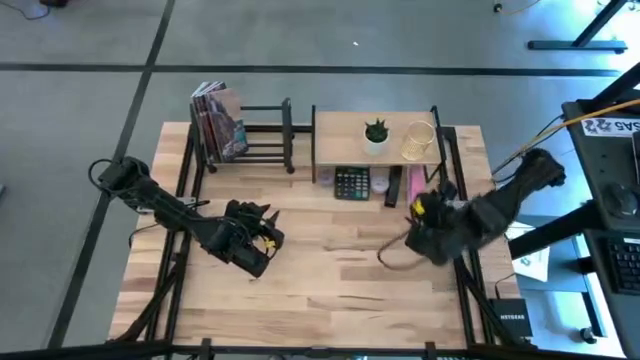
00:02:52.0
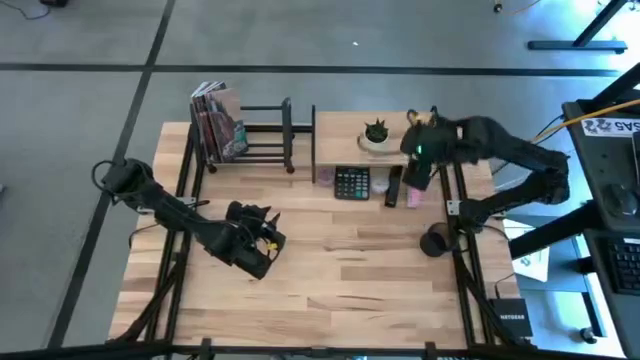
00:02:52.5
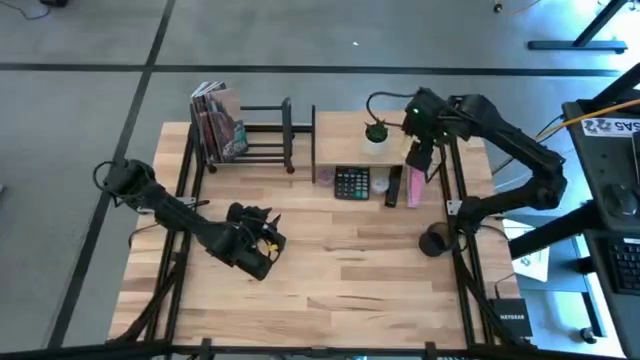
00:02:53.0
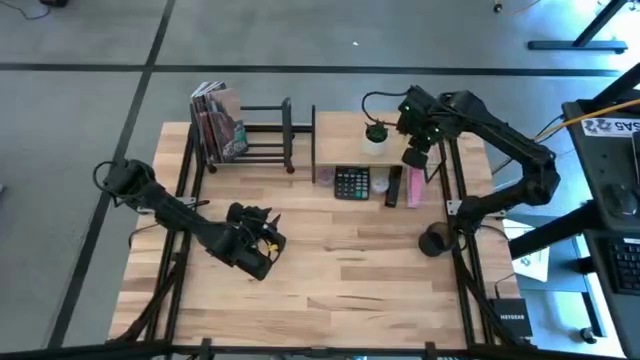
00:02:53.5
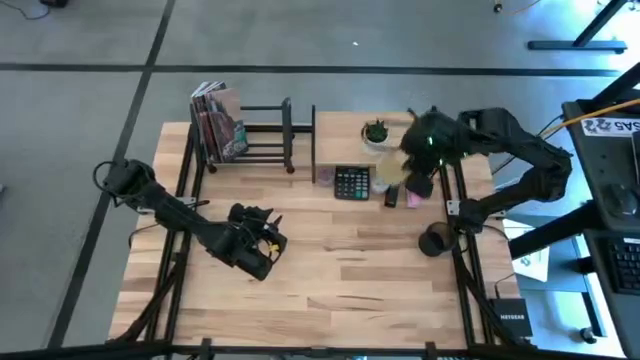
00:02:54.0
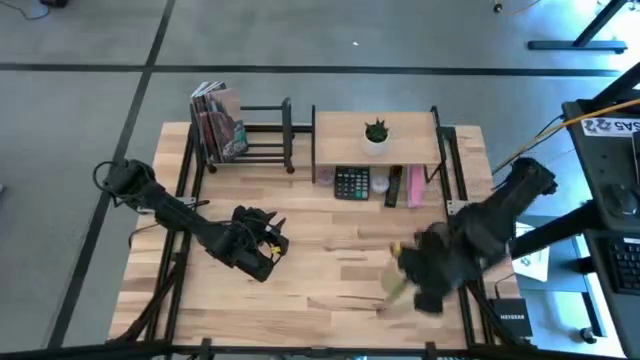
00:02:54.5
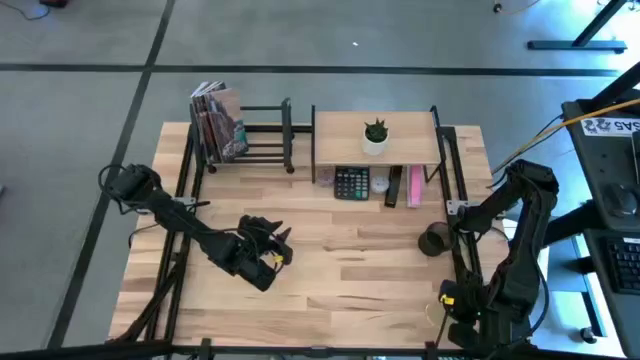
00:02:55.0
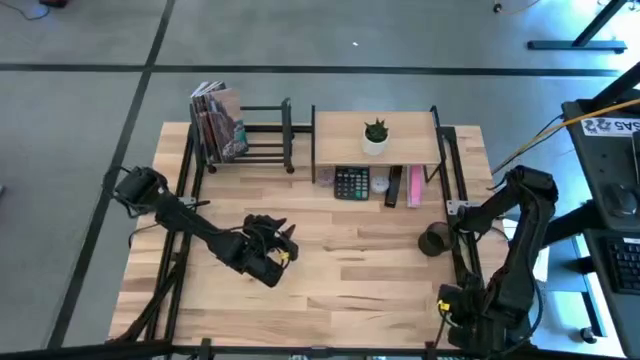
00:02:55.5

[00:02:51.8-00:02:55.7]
Task: Stock shelves
Remove the gold pen organizer from the shelf

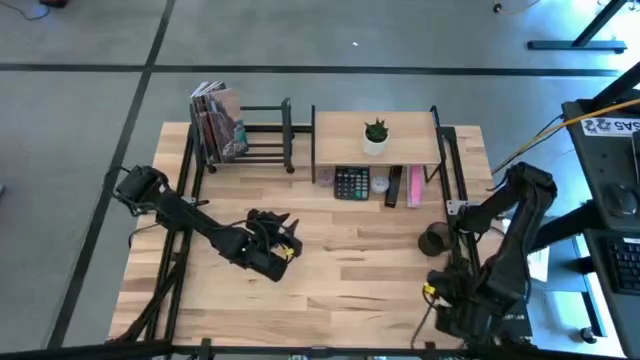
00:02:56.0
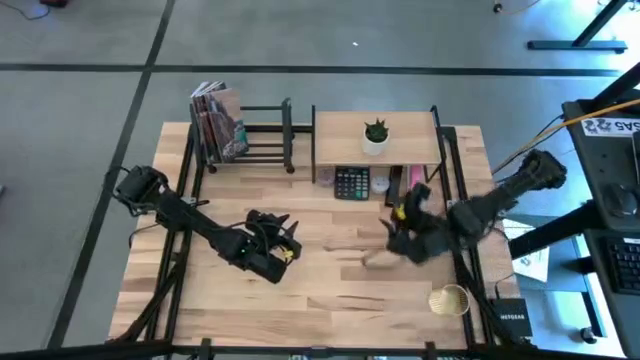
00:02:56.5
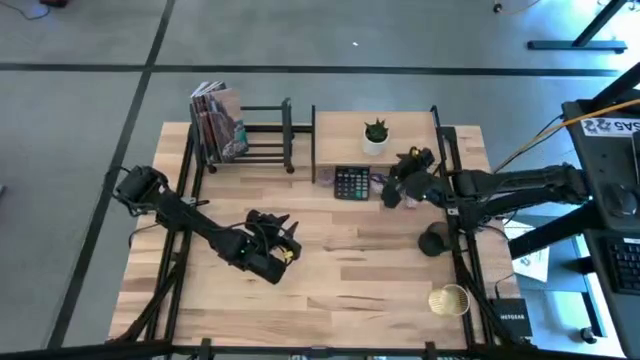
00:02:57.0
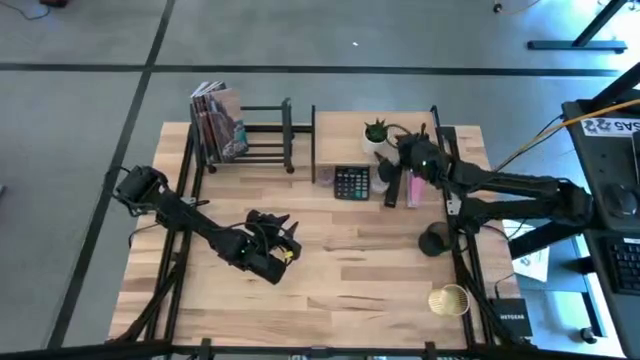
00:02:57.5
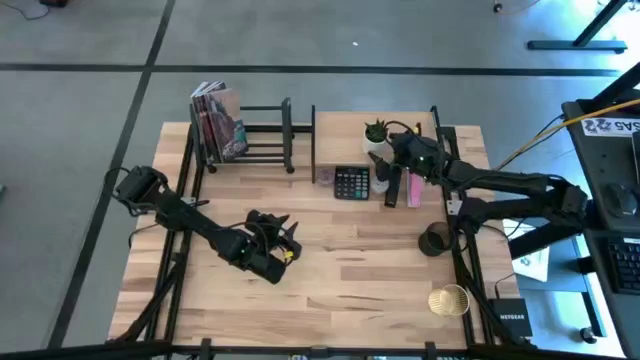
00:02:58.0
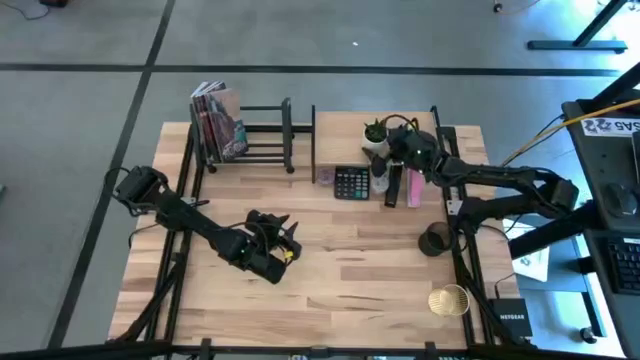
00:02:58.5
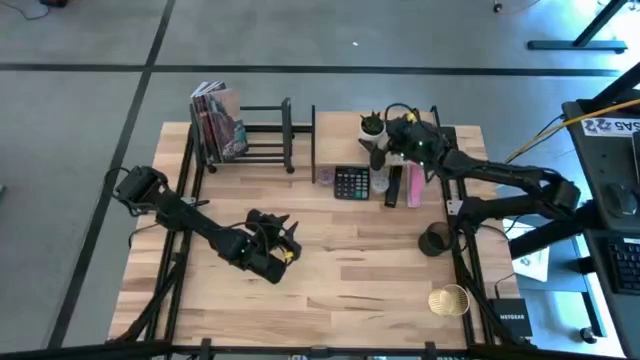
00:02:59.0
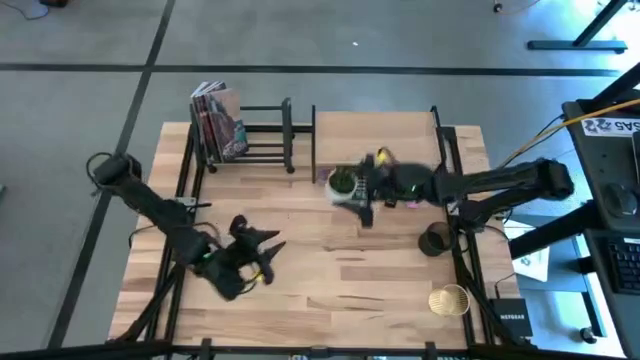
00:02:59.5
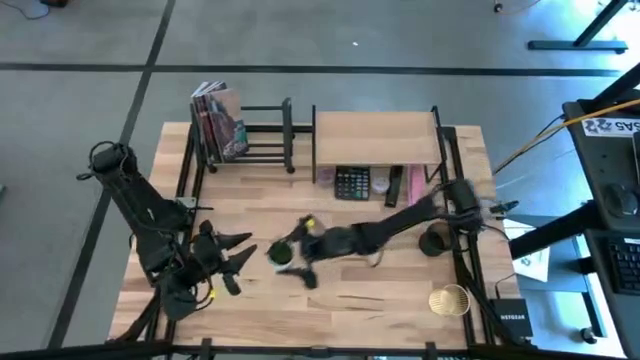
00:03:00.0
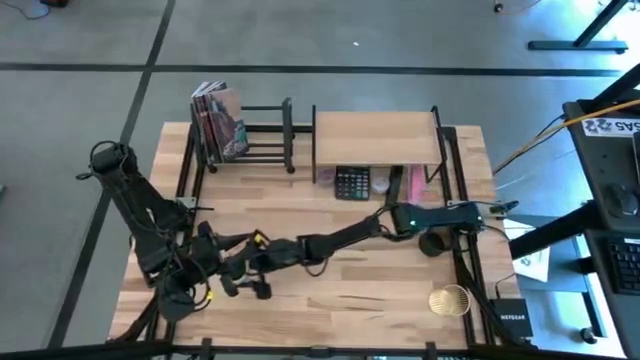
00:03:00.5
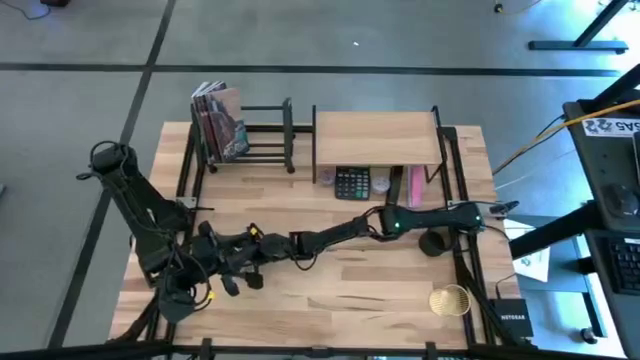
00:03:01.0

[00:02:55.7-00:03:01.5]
Remove the flower vase from the shelf

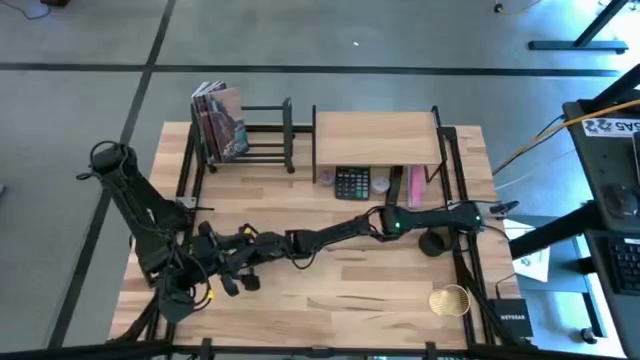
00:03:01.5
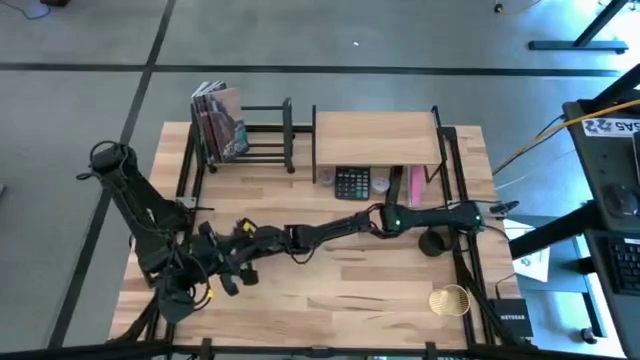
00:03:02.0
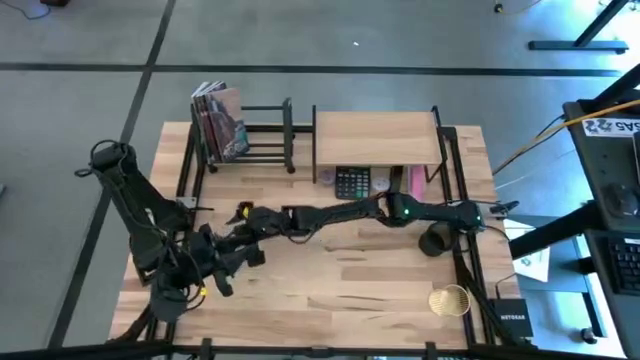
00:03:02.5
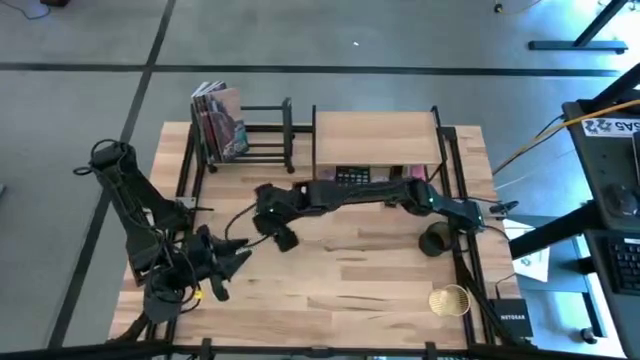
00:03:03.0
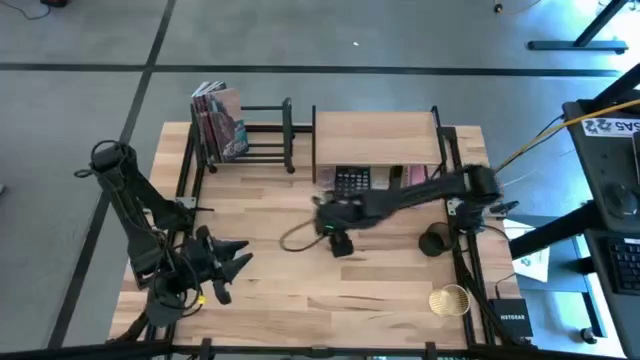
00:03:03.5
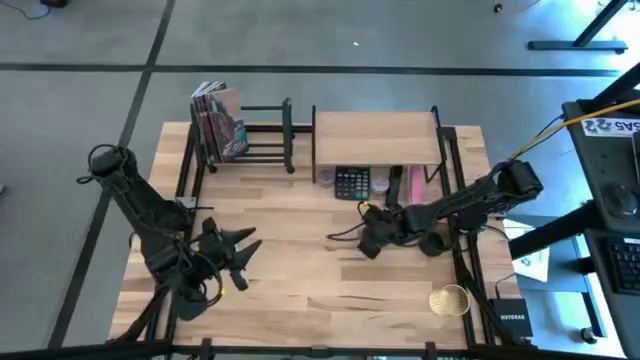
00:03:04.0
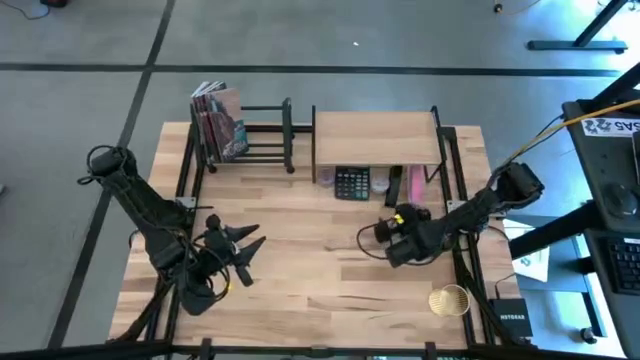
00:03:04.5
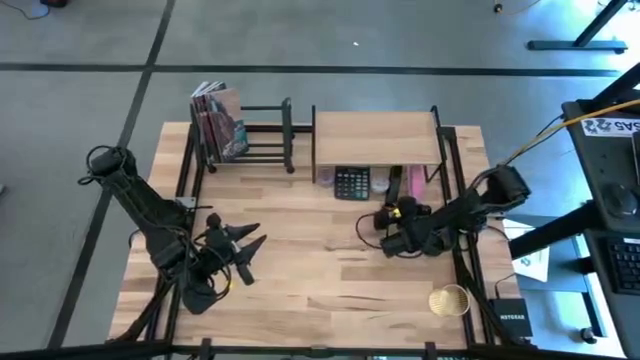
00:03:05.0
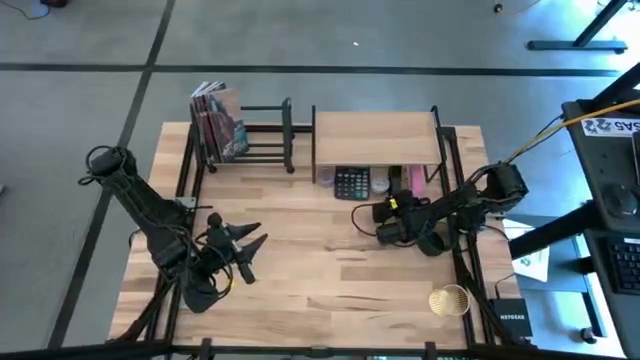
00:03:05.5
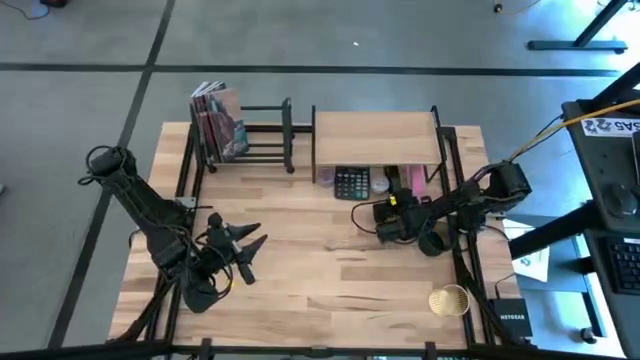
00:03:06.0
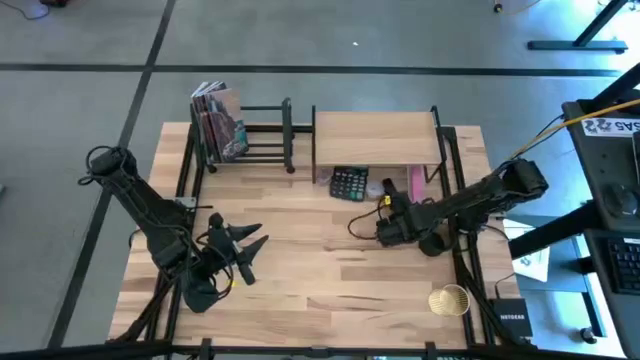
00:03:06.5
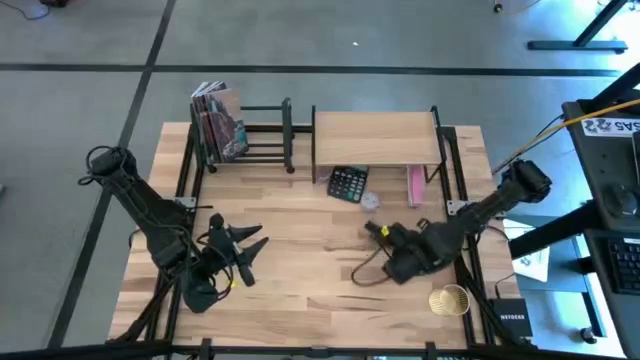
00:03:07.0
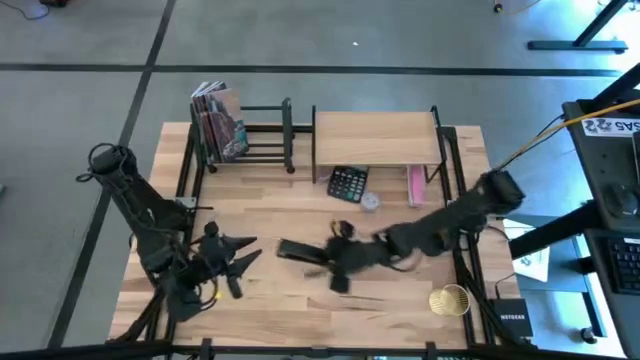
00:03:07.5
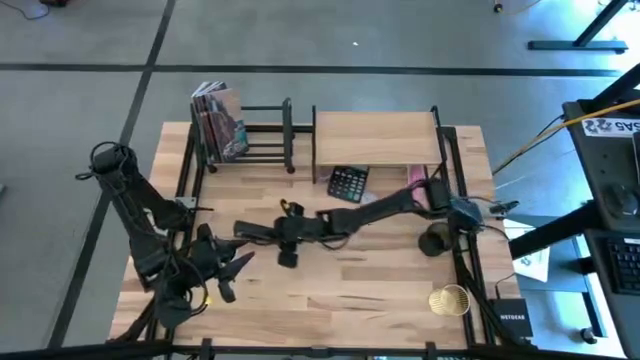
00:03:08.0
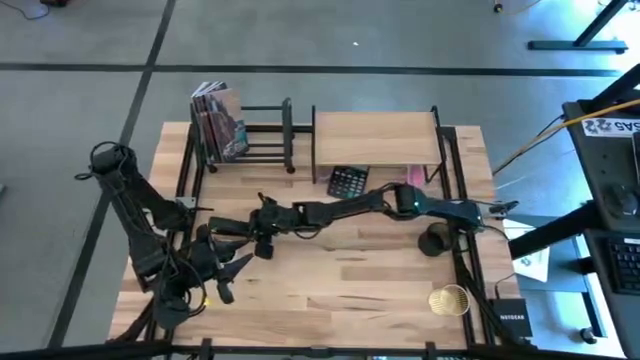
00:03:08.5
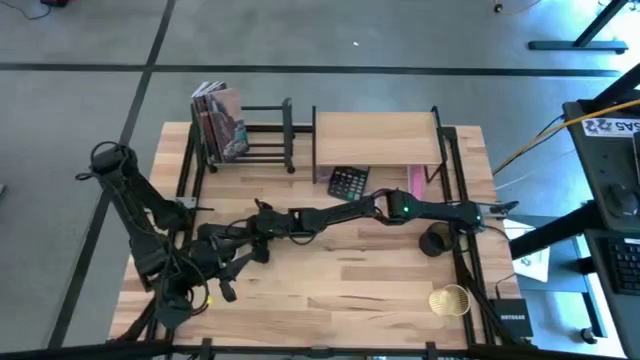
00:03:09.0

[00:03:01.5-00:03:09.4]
Remove the black stapler from under the shelf

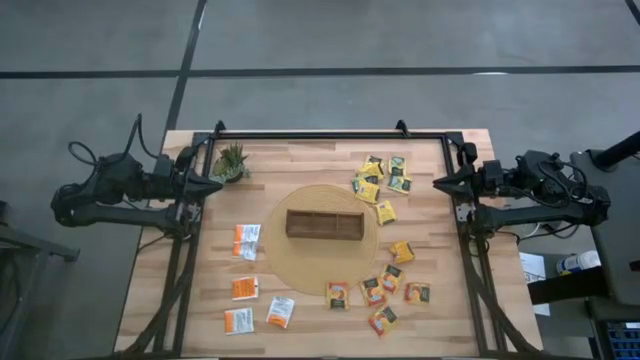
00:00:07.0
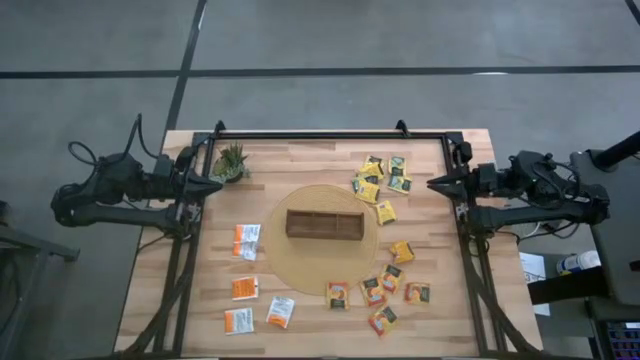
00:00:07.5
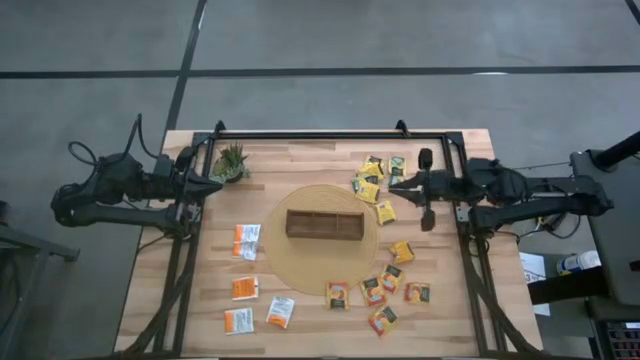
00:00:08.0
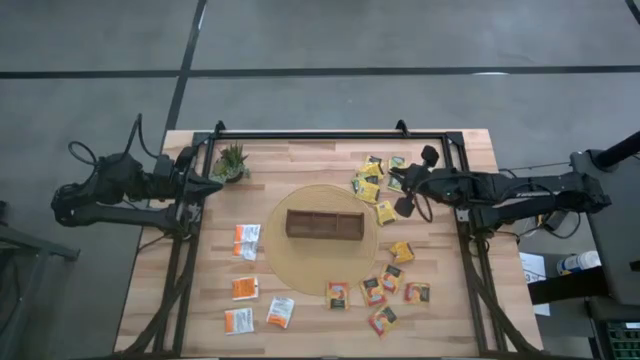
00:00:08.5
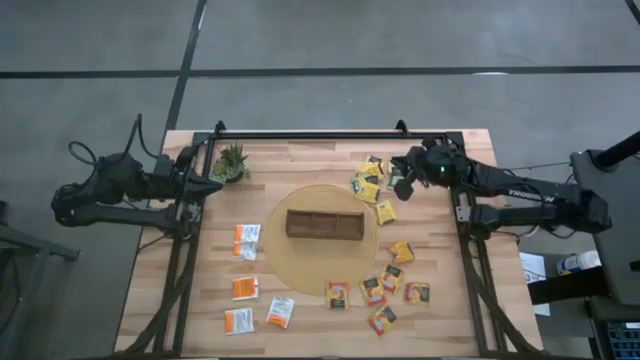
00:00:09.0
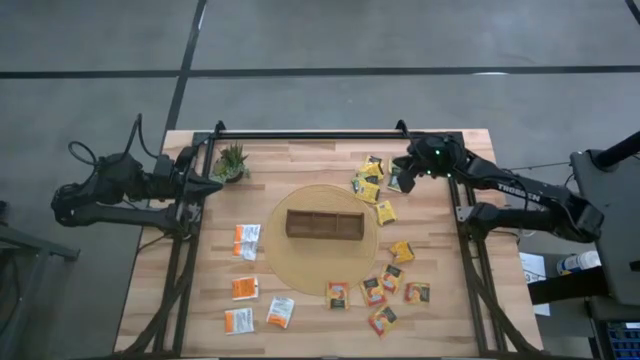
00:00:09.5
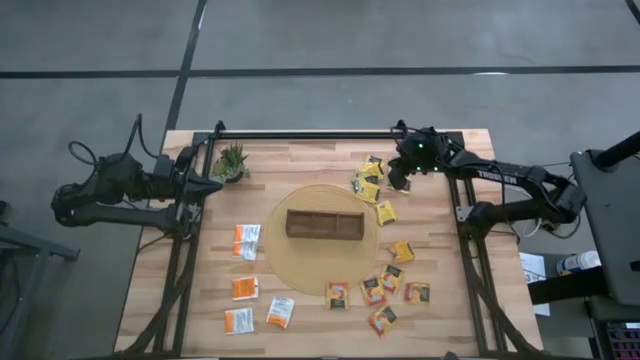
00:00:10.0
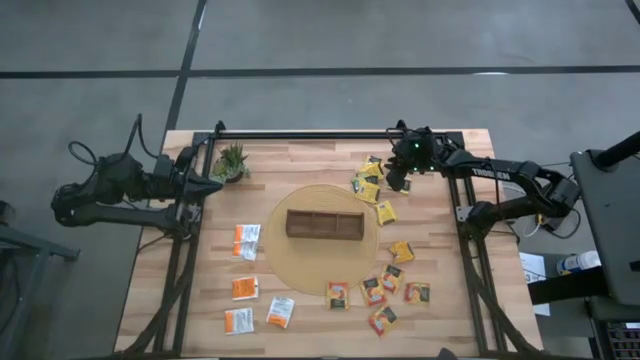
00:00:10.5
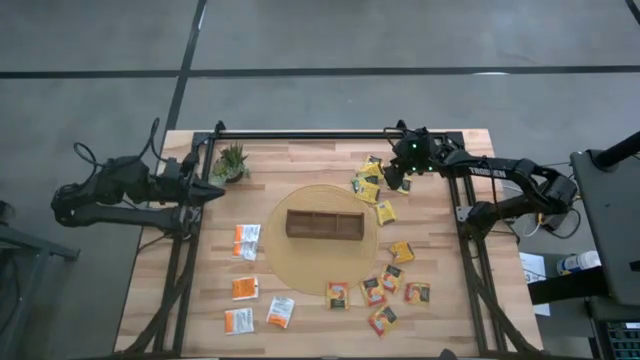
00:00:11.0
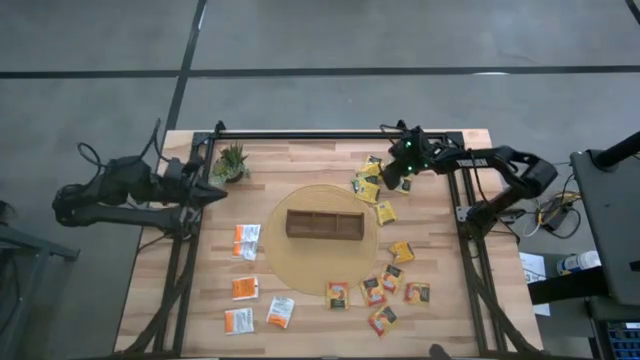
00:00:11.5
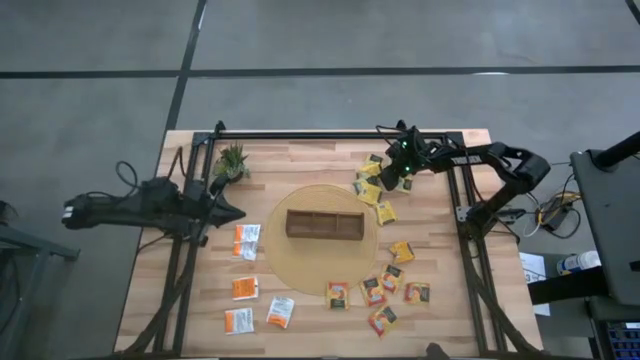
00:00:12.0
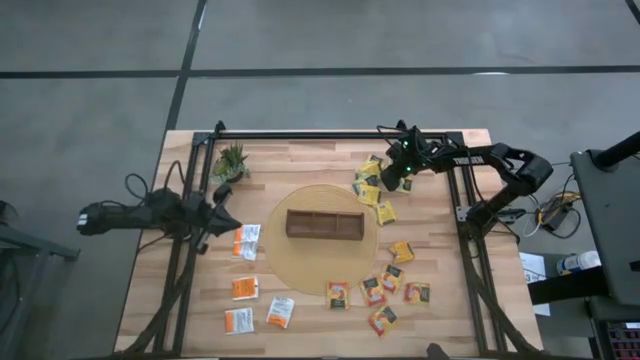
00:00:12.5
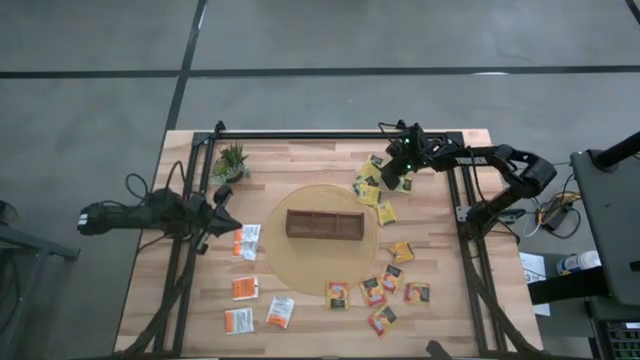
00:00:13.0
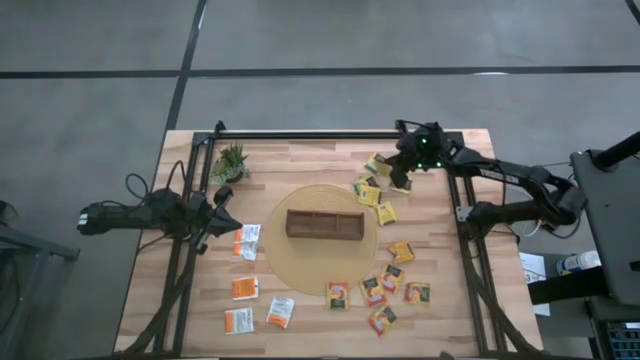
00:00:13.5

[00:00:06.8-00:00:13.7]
Task: Pick & Place Tea
Put the yellow tea bag into the right of the wooden organizer
